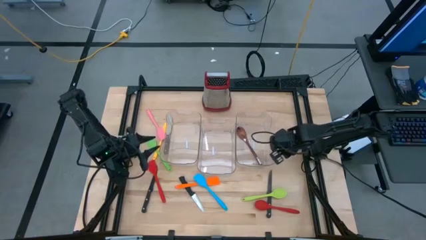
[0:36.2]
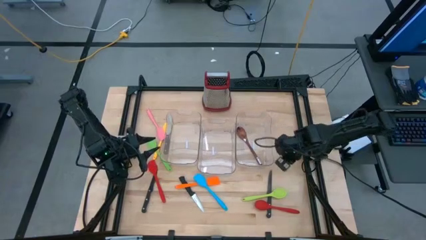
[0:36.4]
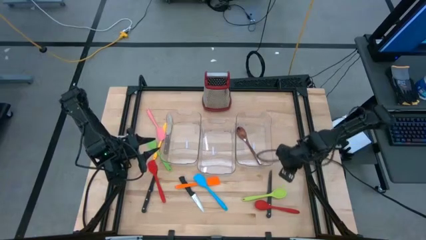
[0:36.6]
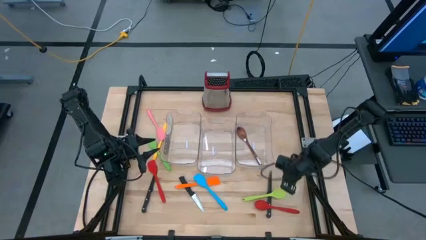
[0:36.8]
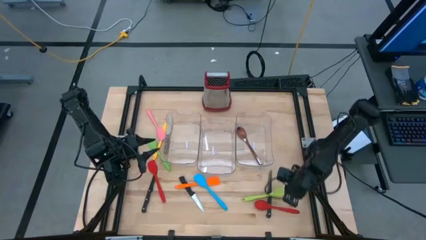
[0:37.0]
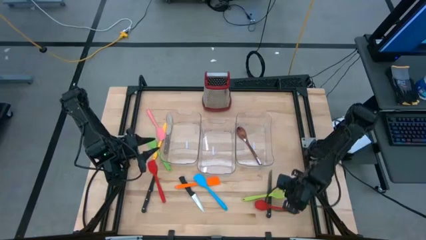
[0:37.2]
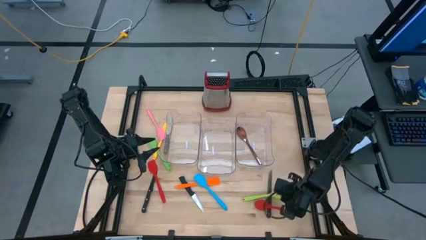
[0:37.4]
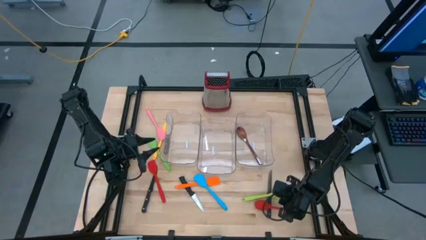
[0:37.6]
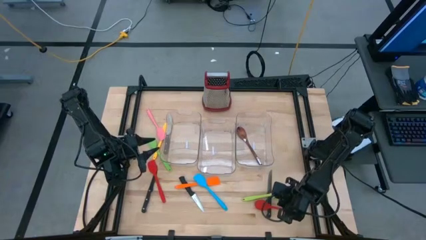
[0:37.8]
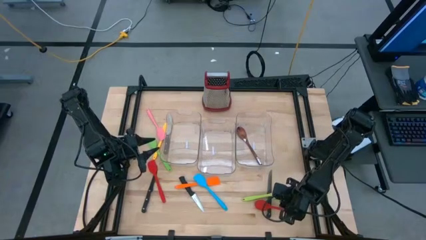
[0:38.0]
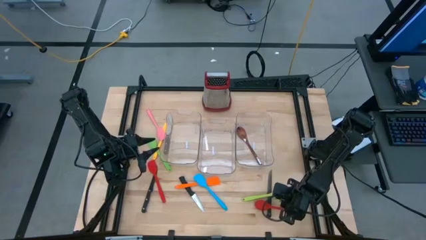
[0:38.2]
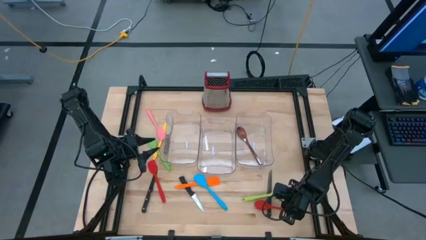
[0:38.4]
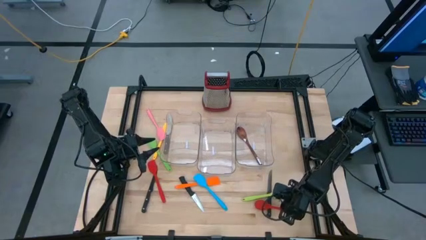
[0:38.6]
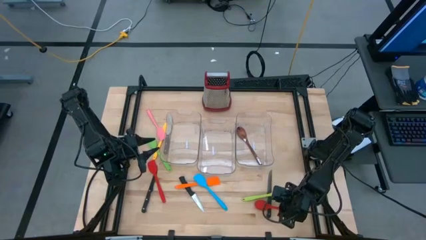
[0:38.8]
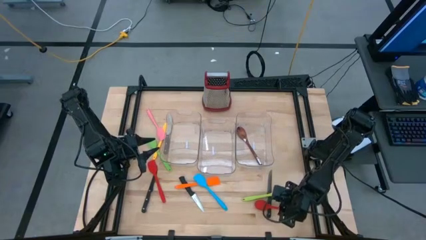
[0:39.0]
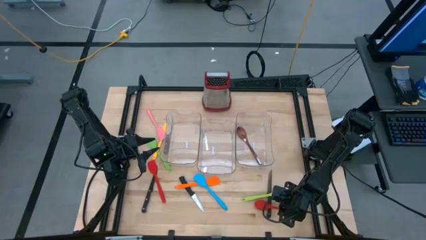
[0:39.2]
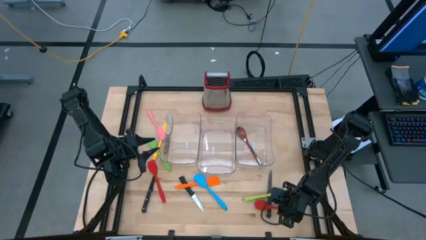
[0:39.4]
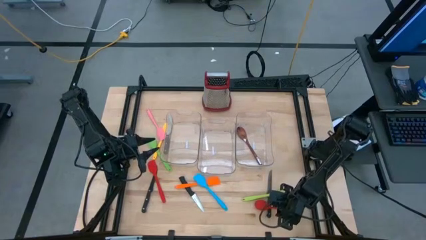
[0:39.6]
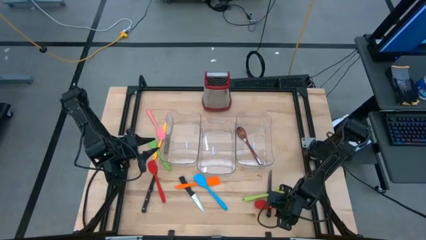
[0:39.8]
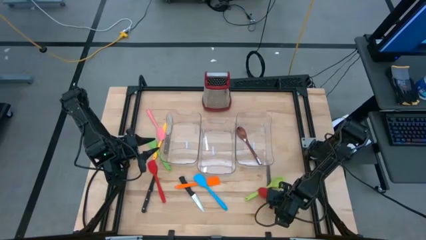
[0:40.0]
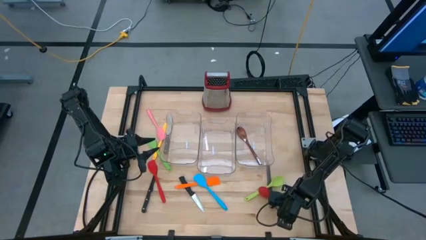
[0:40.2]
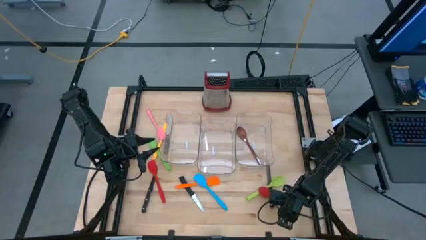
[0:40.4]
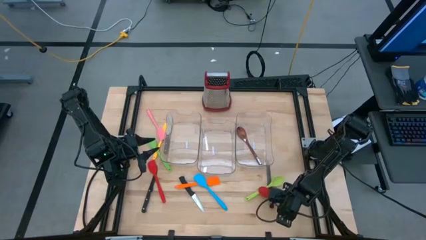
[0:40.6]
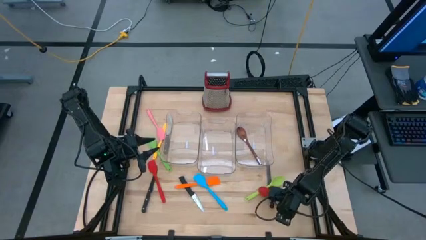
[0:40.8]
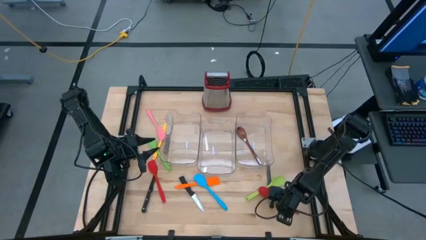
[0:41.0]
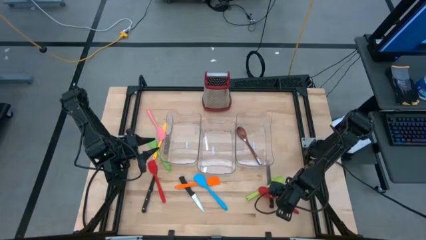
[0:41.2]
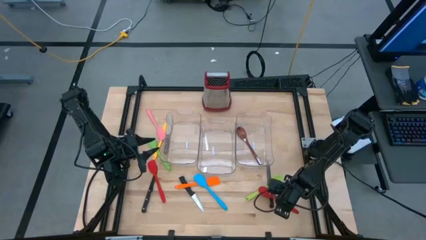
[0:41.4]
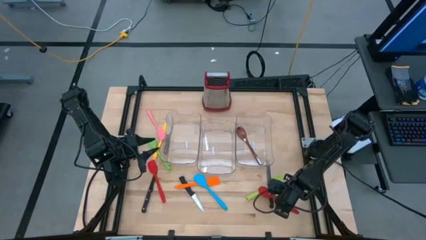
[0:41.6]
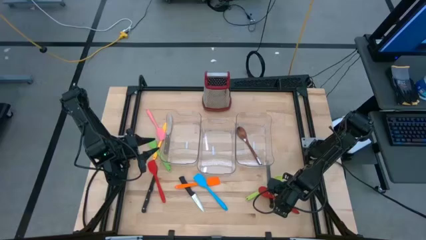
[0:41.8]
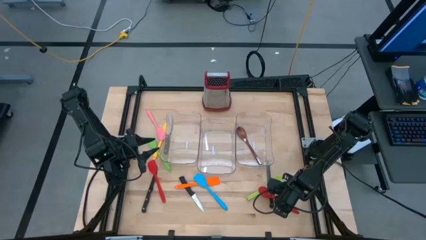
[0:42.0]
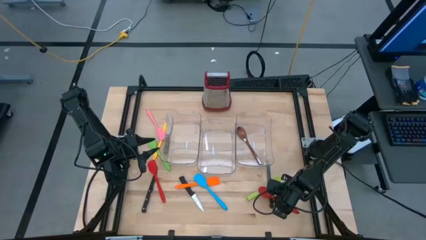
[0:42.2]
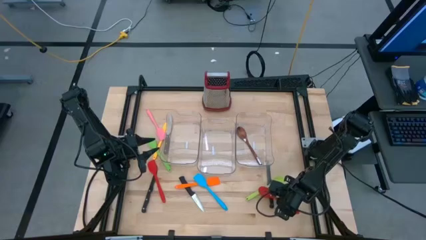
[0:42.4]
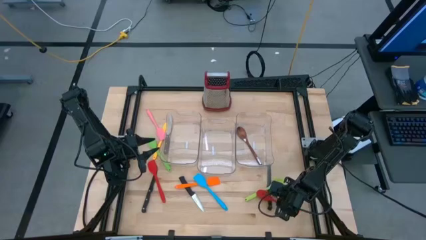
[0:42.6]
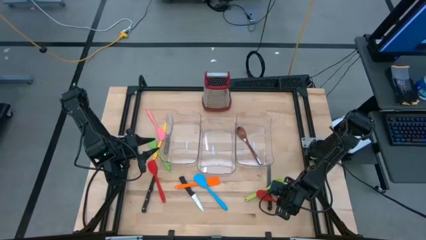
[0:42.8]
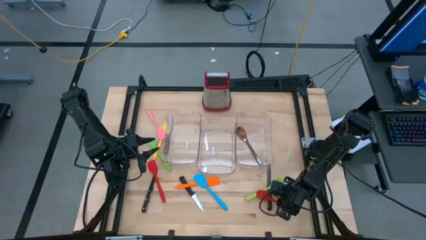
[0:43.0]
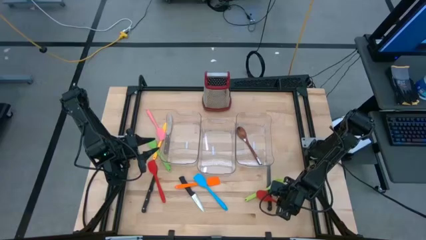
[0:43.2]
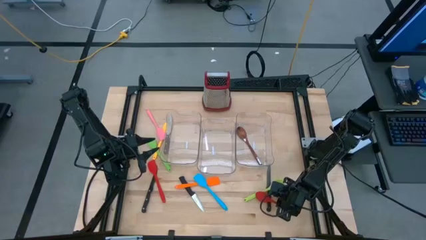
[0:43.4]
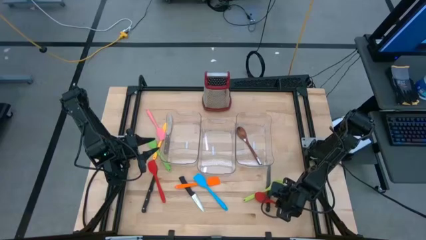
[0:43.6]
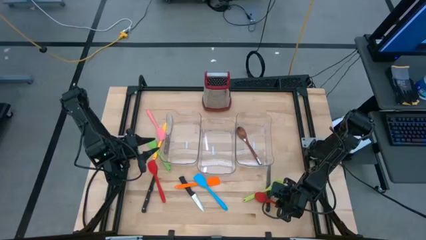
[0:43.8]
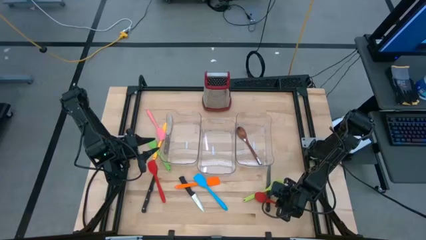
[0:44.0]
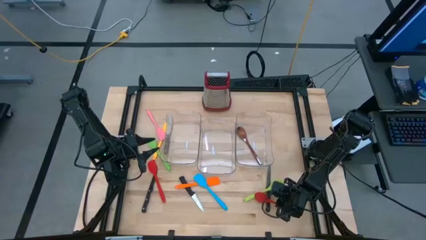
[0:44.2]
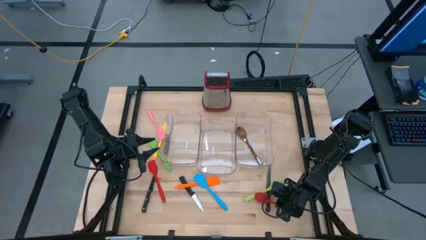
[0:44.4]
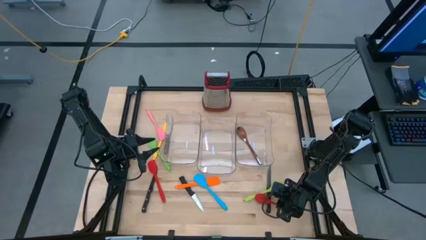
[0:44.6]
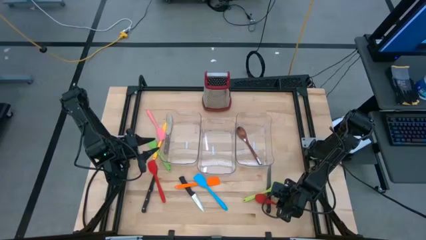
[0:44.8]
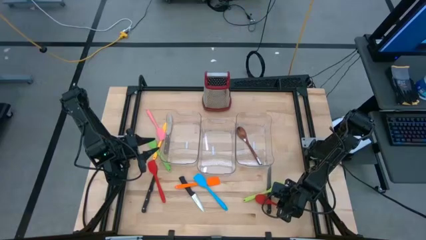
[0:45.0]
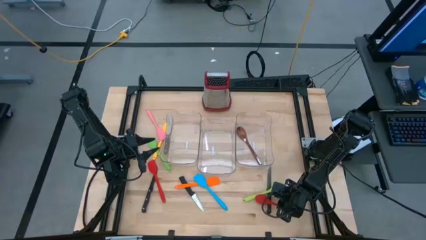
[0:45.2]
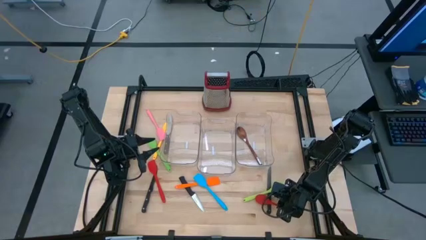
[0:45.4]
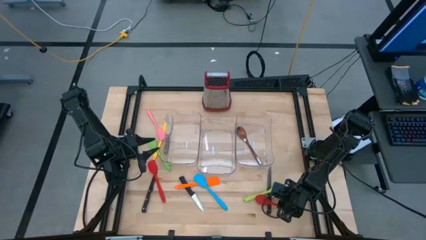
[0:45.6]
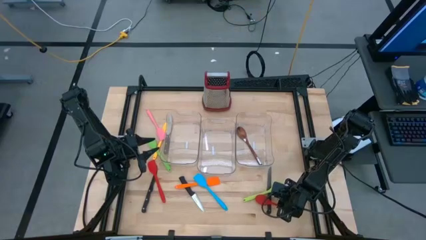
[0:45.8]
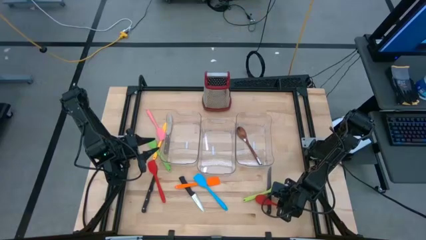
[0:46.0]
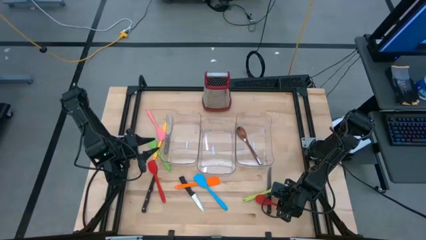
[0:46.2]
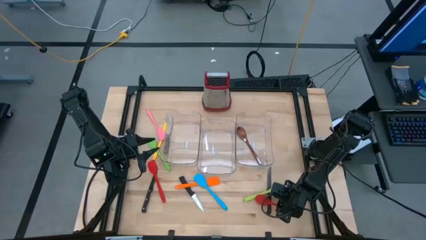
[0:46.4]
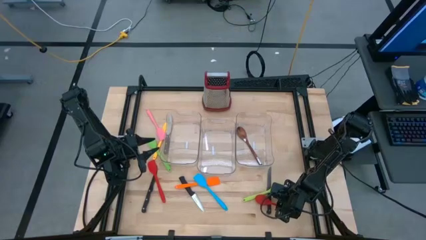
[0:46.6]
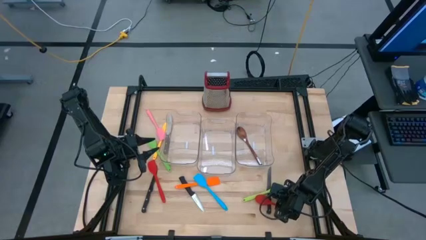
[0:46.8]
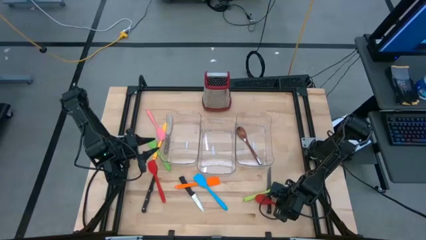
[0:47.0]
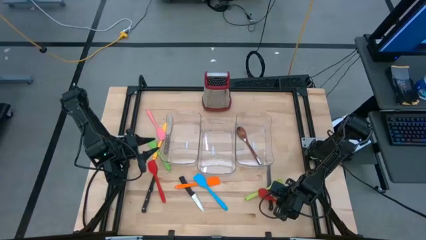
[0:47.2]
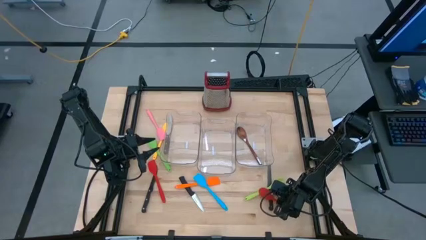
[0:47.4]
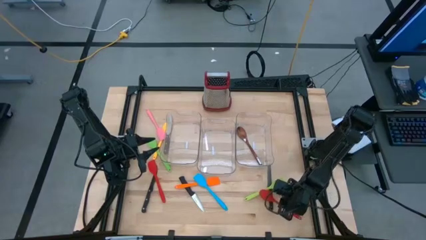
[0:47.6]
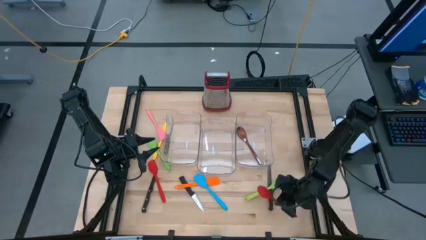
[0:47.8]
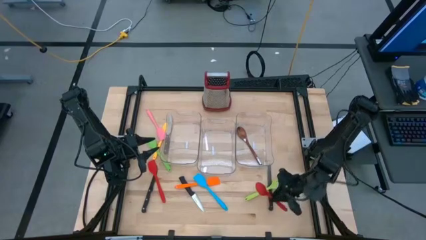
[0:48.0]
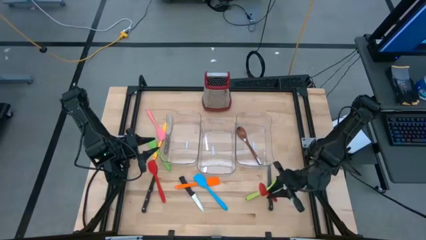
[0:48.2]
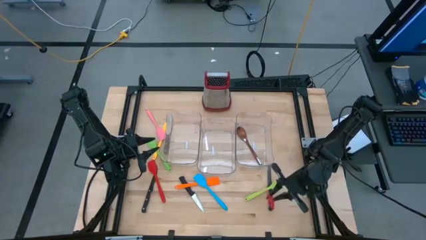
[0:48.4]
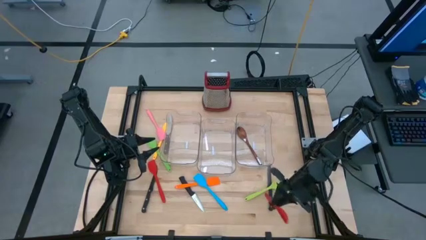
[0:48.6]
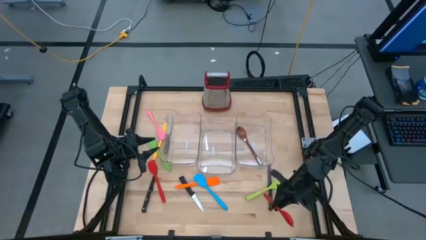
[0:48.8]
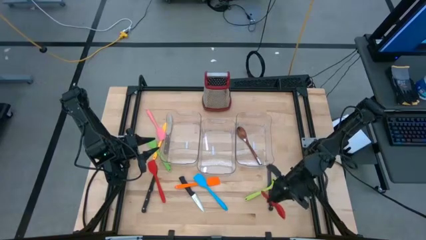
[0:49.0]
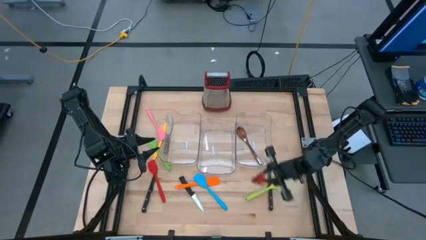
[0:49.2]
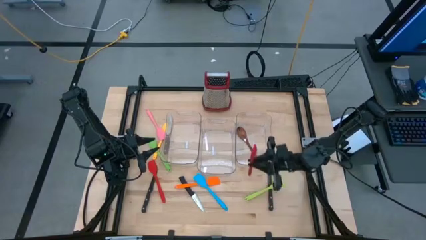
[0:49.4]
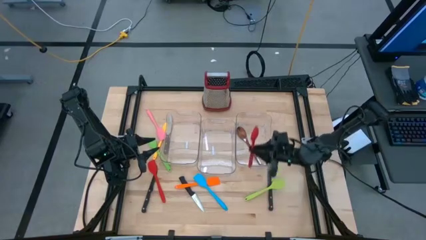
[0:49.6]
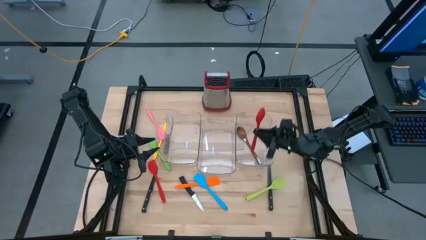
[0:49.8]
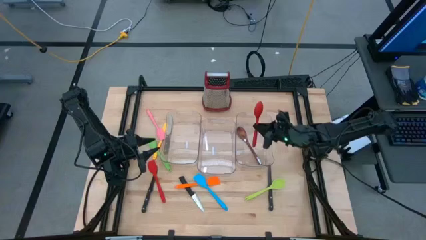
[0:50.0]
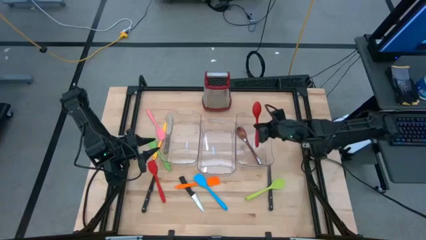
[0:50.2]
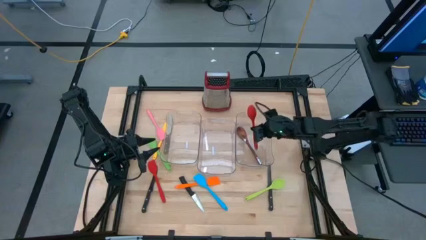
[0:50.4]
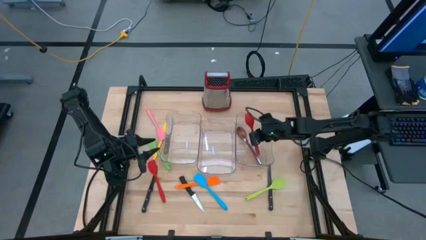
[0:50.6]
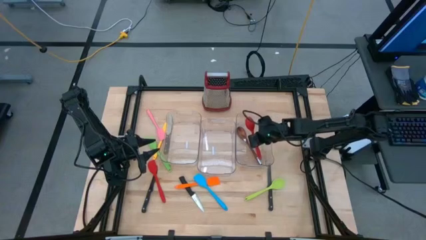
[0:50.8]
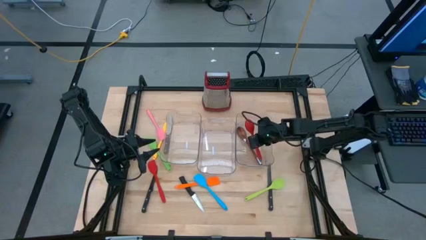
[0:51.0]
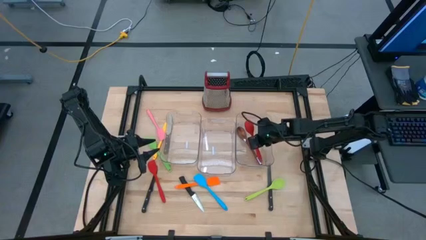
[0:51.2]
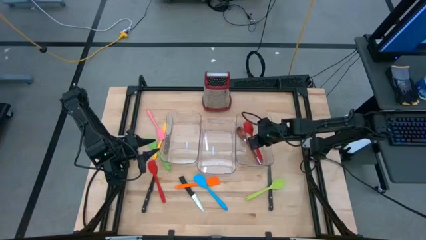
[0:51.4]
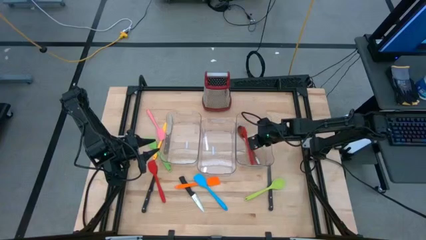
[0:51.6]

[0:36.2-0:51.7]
Task: Pick & Place Kitchen Items
Put the red serving spoon into the right transparent bin

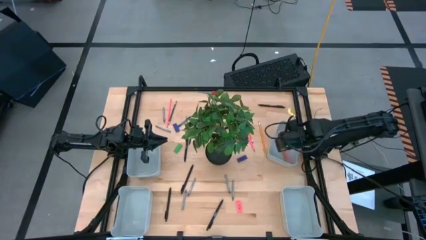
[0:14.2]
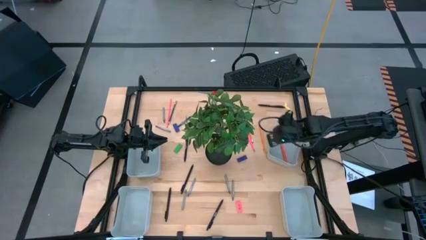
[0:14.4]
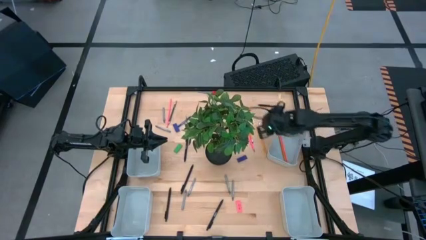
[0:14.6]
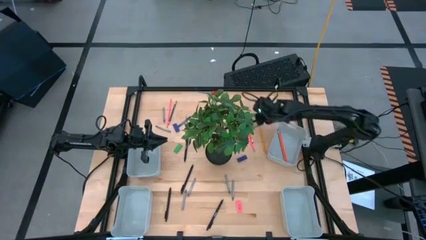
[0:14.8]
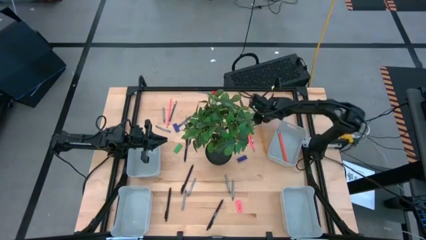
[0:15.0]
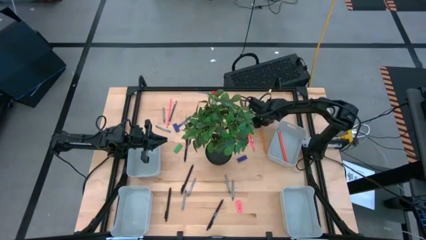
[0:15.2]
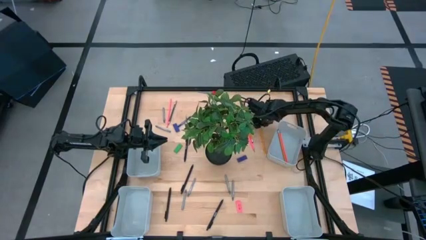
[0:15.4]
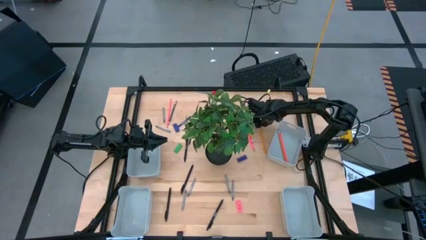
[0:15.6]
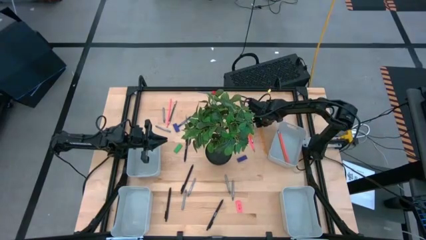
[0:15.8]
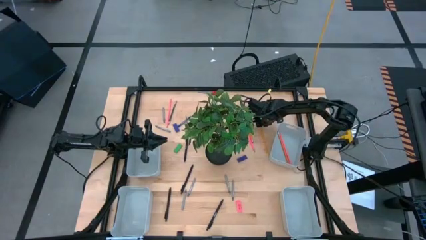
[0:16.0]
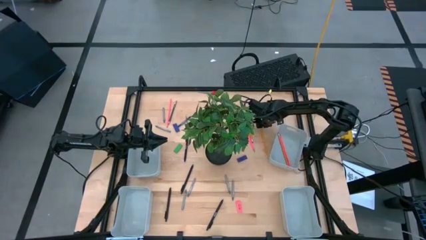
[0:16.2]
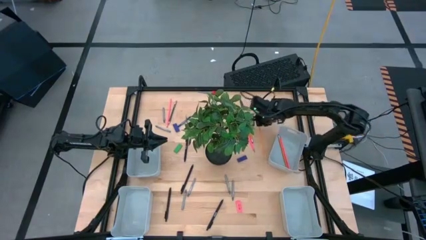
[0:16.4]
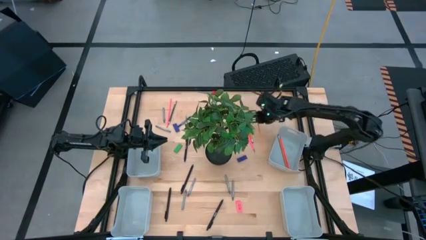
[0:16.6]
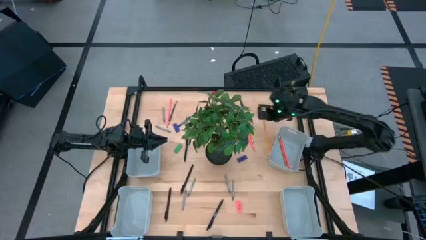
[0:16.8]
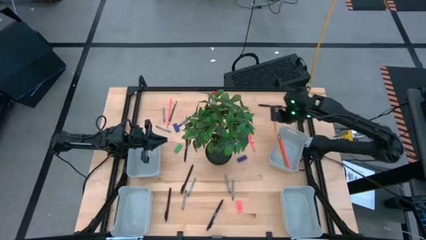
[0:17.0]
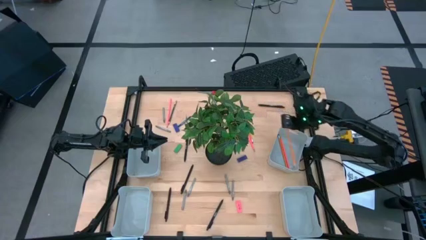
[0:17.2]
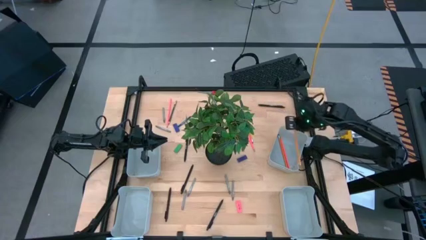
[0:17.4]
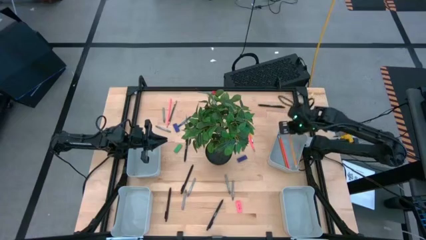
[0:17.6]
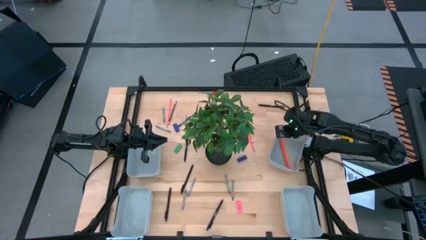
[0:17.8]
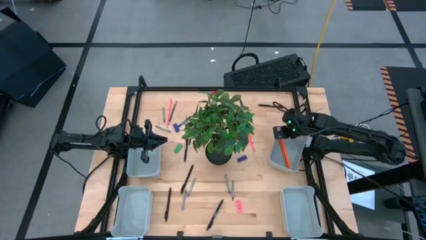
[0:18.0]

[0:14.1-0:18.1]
Task: Sort crayons/erasers/pens/pencils in bins
Put the orange pencil into the top right gray bin
